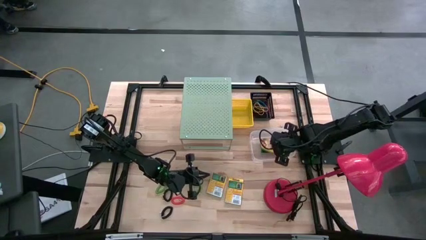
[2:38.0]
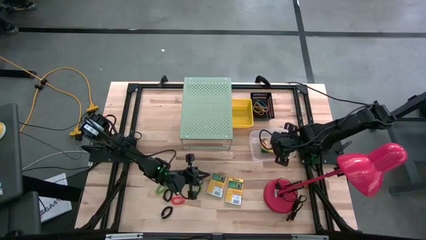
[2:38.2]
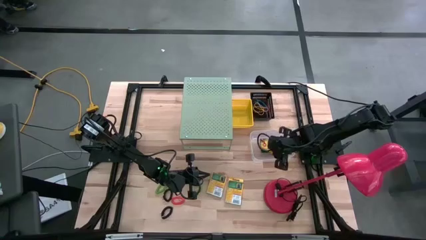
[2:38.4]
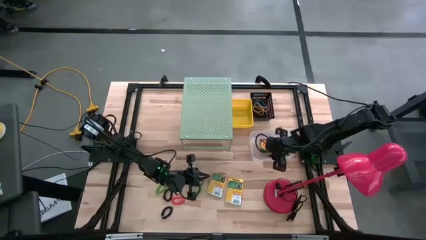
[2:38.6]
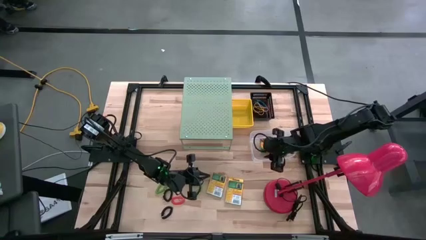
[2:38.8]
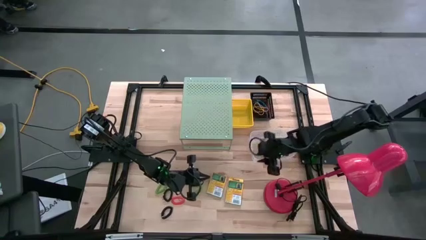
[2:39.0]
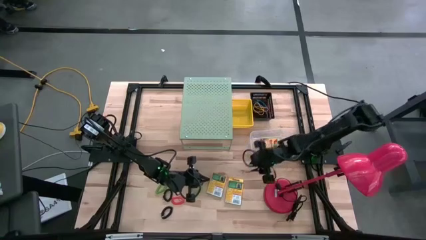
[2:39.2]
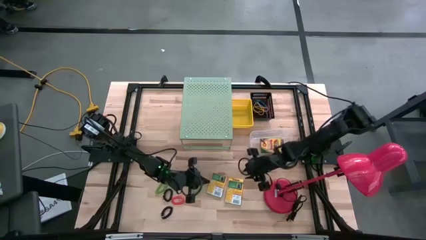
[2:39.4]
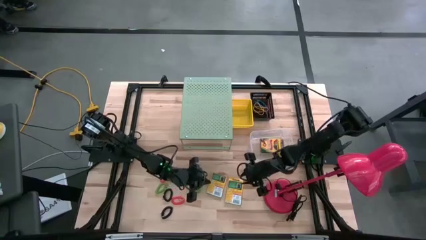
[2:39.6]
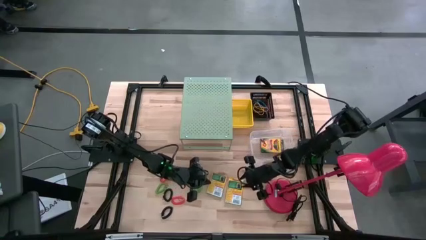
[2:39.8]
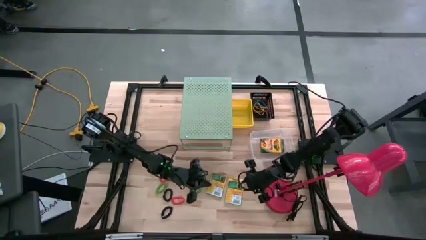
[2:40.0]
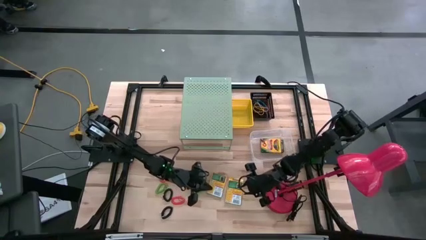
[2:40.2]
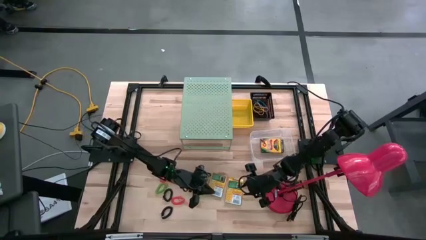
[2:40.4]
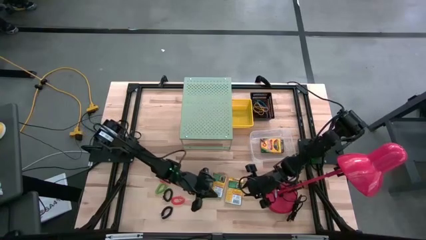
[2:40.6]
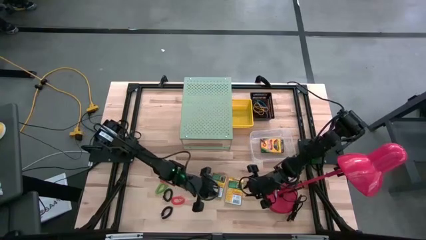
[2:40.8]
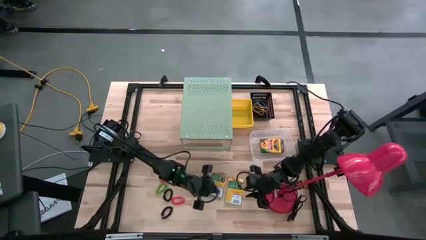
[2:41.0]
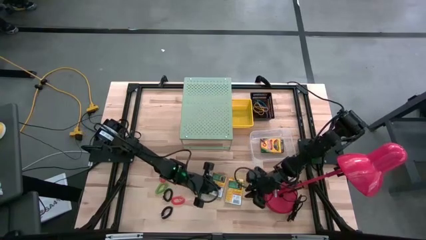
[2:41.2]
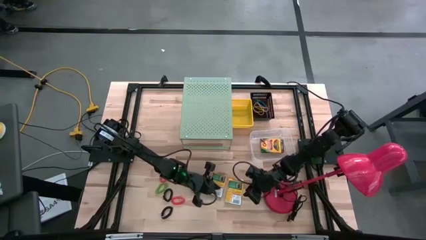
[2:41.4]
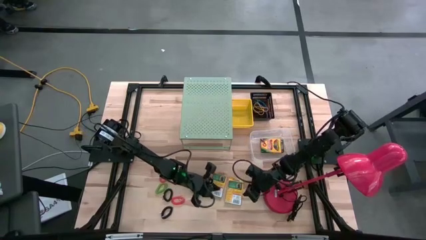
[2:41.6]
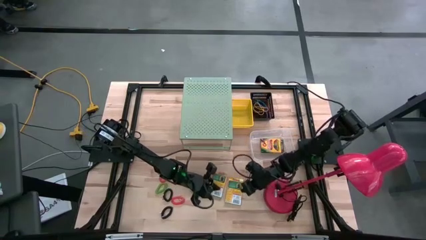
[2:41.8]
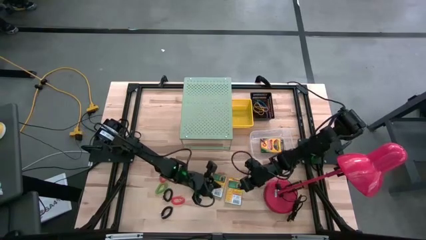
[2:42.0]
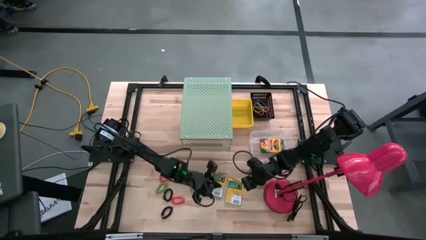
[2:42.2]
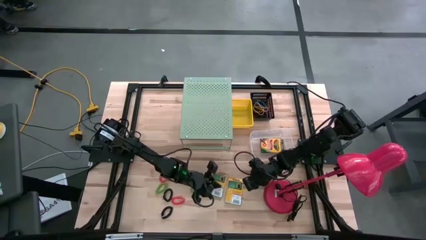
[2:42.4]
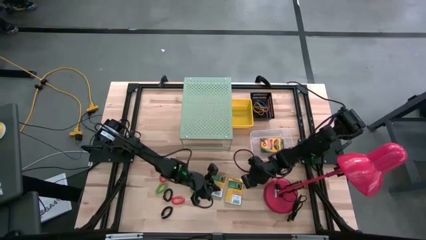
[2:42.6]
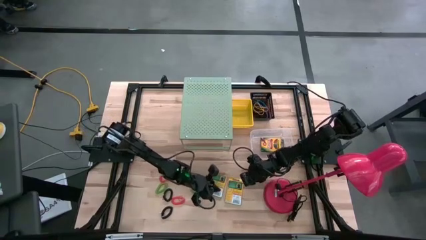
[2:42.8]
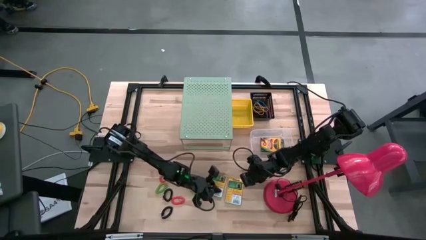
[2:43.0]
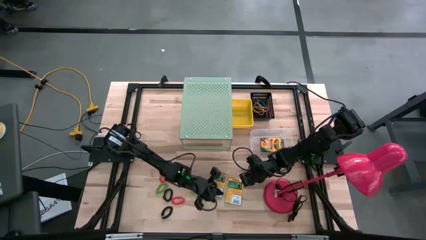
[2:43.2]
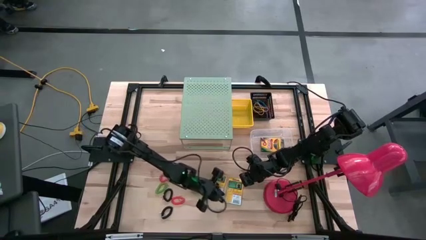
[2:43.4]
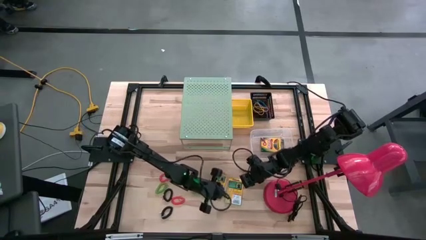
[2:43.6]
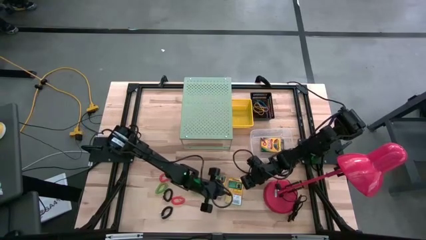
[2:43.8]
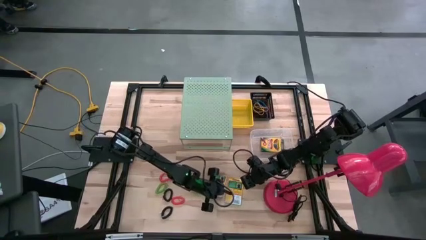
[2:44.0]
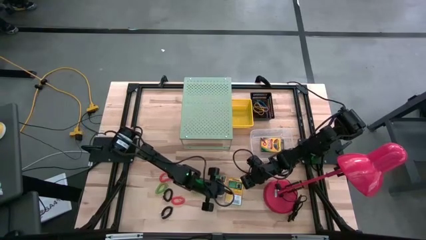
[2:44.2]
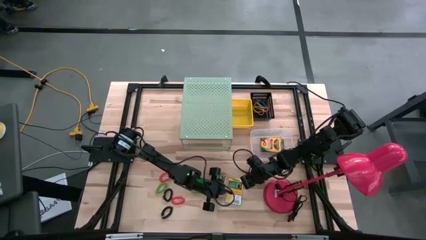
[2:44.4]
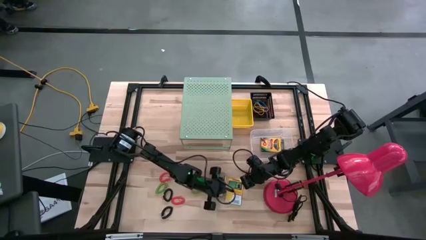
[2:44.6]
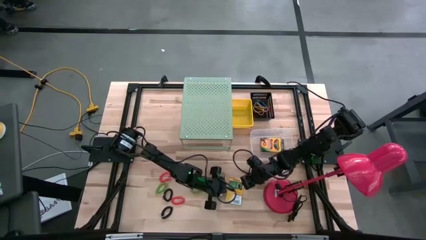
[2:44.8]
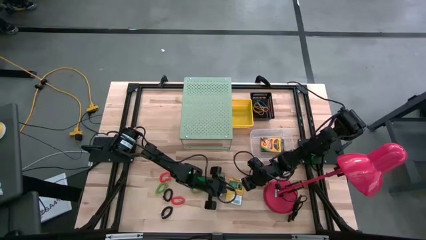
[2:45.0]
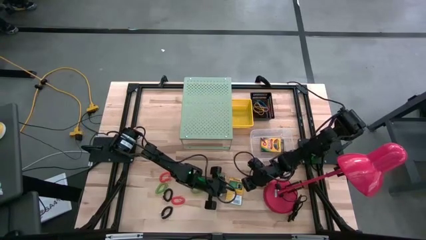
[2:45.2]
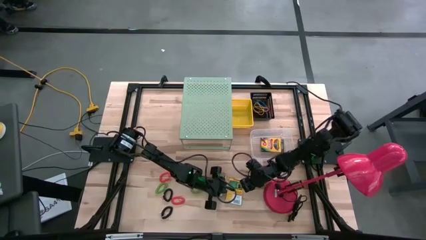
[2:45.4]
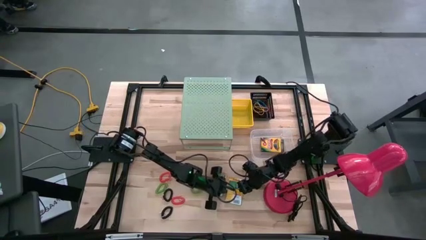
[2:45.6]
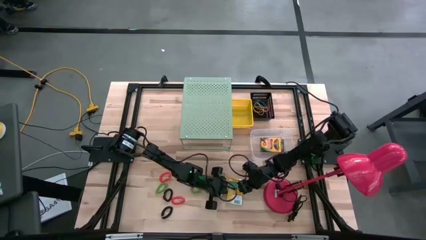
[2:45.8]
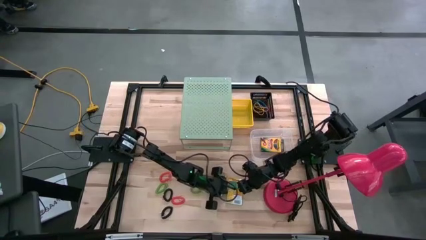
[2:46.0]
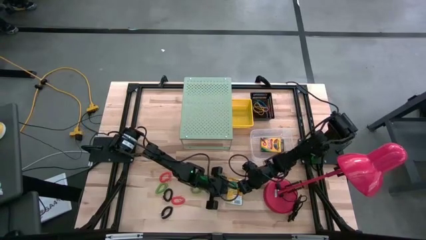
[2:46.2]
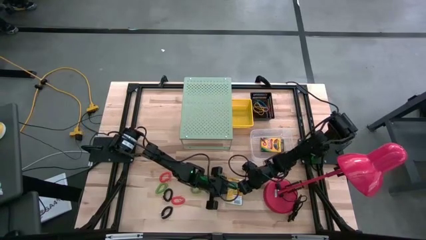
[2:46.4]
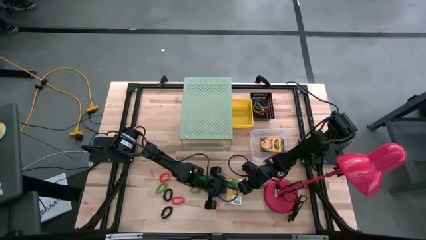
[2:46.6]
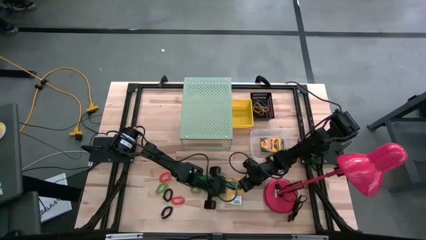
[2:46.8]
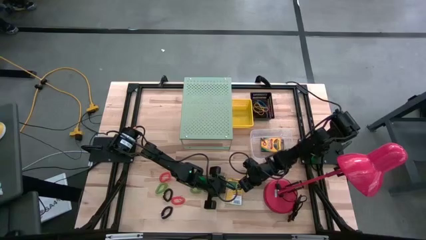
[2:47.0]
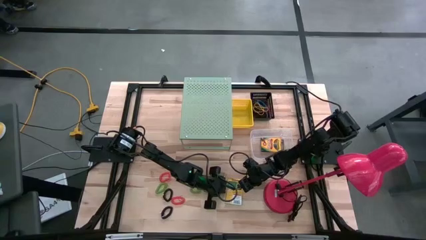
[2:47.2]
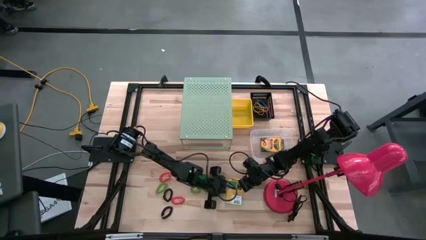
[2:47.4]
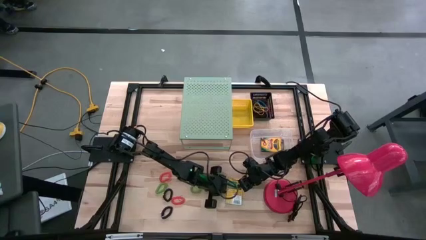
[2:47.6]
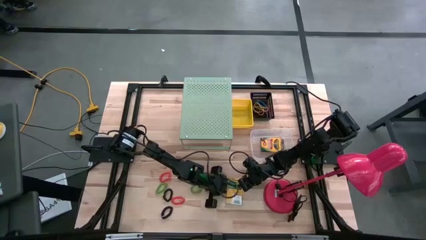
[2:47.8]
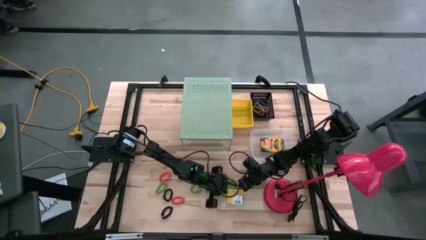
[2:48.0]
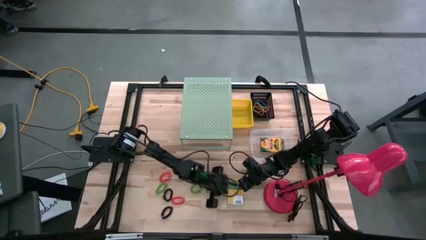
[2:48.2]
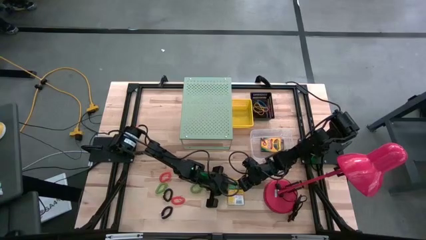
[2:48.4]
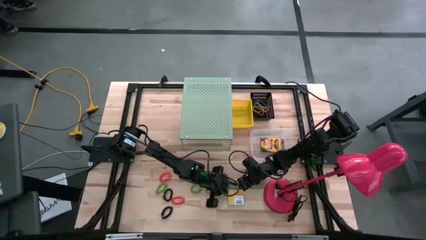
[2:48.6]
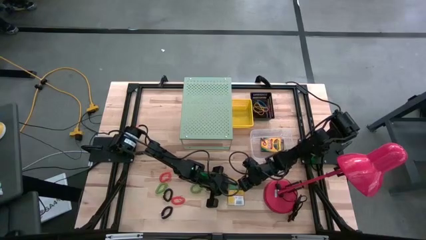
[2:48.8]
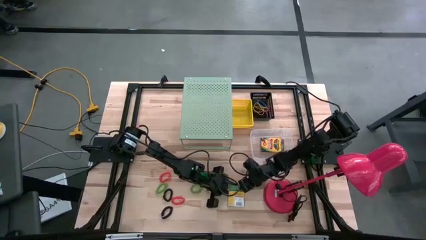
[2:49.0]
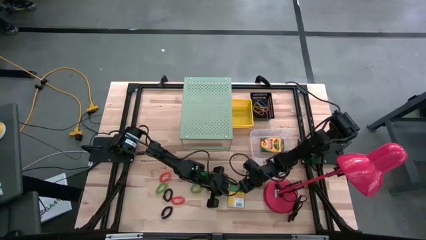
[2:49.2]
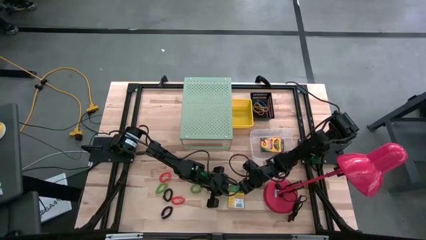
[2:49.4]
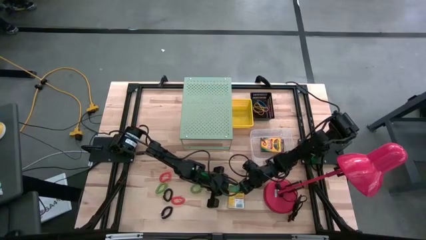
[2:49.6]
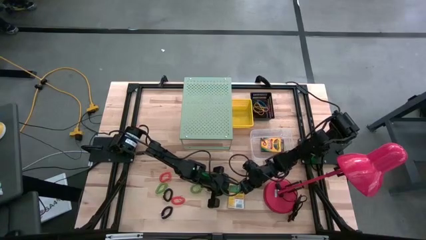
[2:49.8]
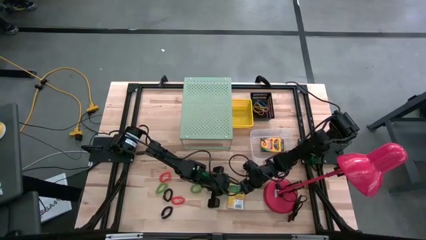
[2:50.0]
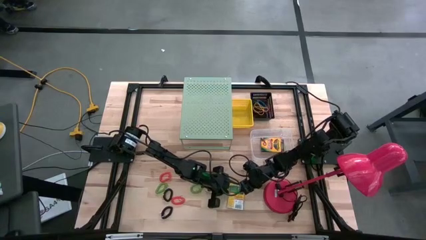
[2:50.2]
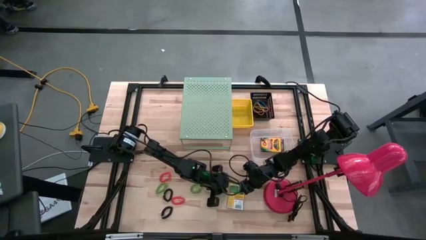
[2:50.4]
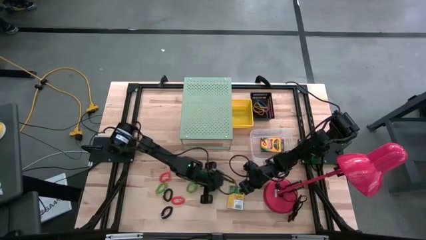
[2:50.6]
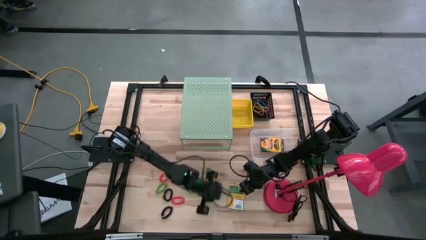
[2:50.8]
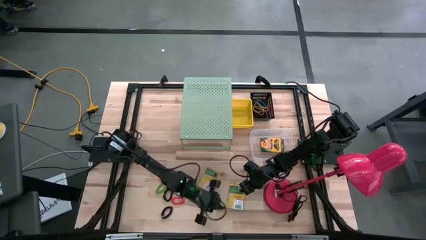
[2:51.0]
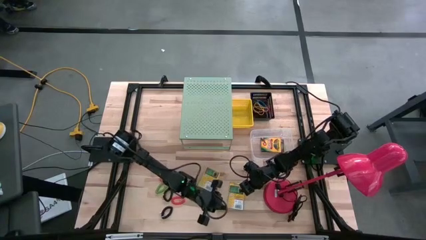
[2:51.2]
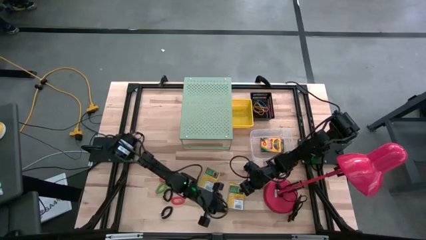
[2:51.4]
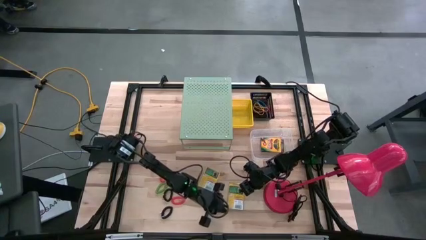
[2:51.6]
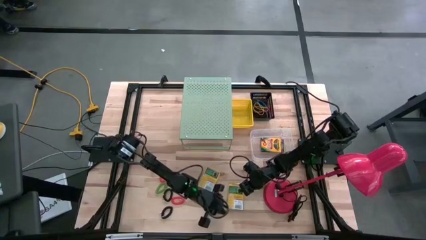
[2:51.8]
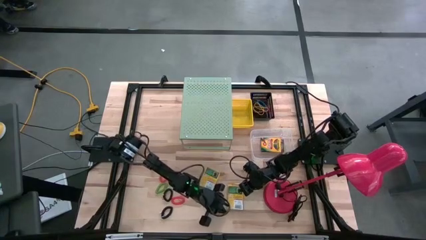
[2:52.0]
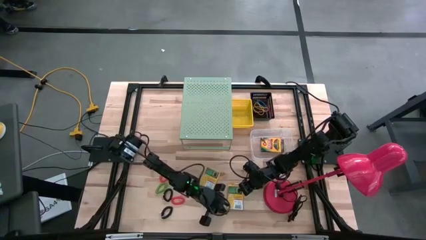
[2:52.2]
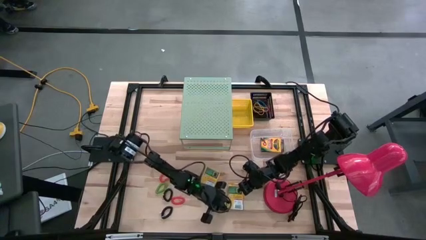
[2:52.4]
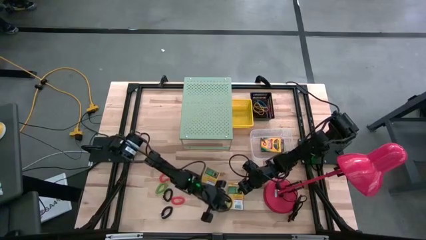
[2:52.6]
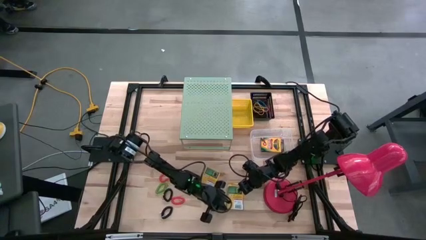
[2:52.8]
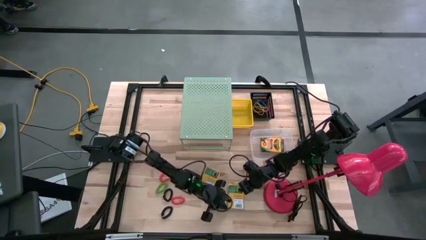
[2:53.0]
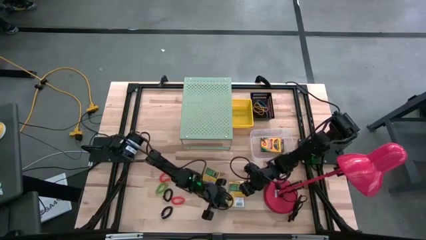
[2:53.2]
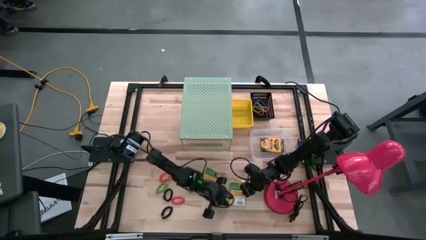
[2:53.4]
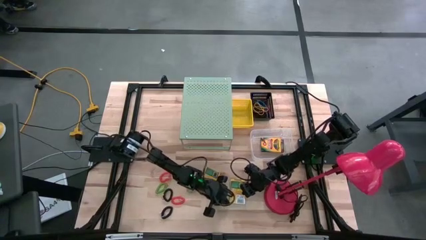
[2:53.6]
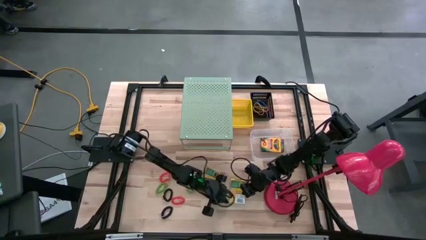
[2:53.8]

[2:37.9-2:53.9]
Task: Pick & Place Office Desk Supplies
Put the crayon box into the transparent bin
